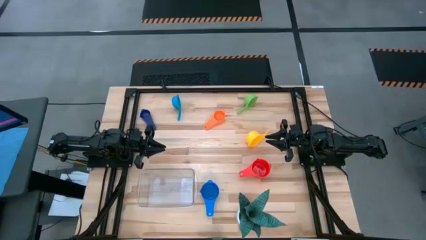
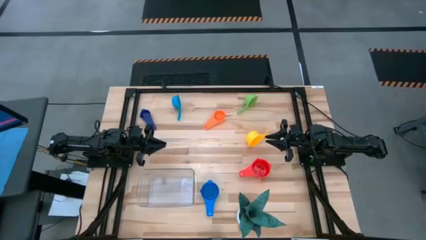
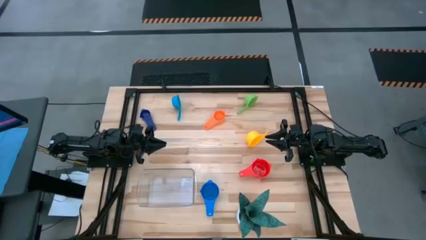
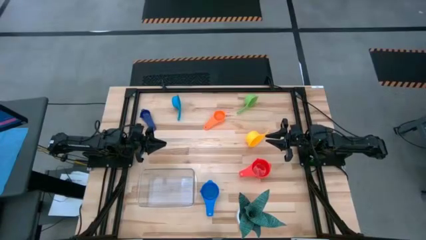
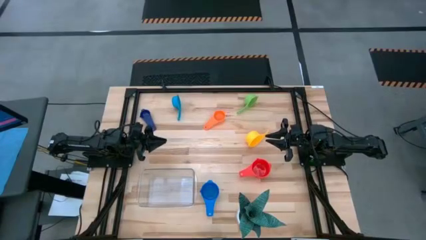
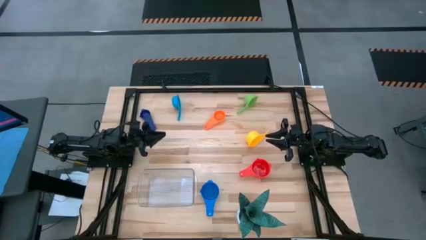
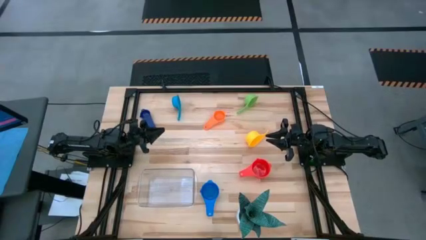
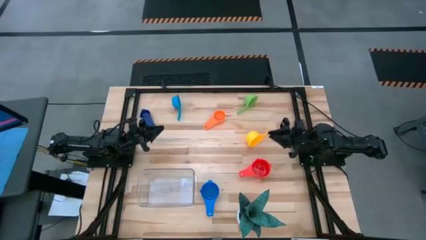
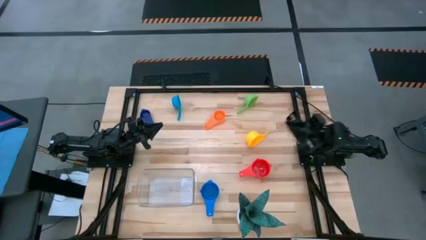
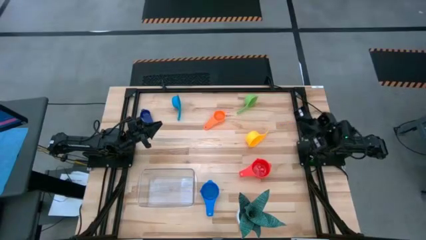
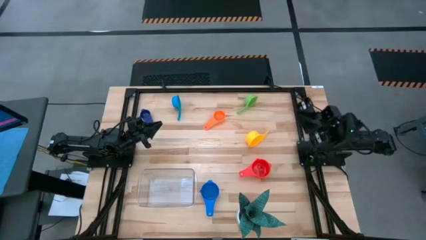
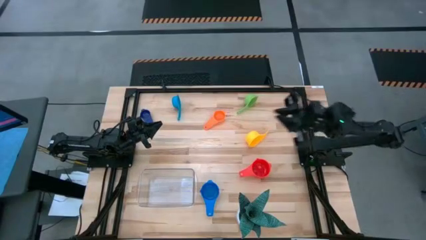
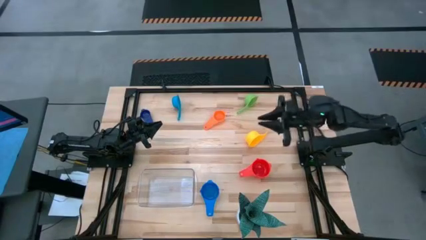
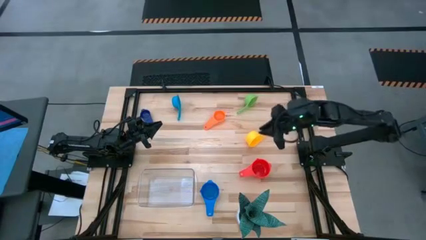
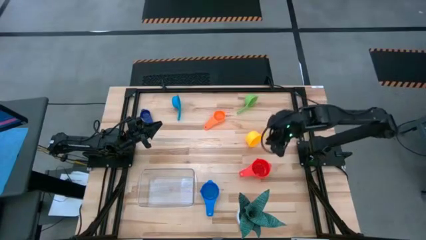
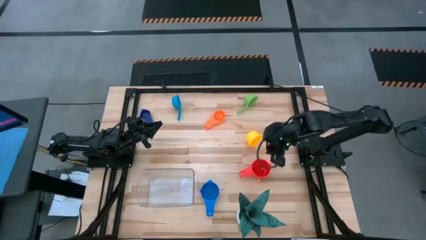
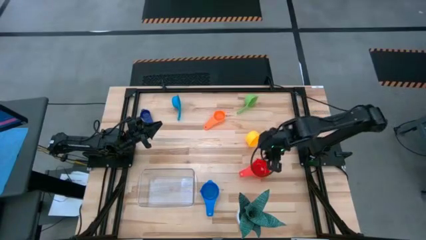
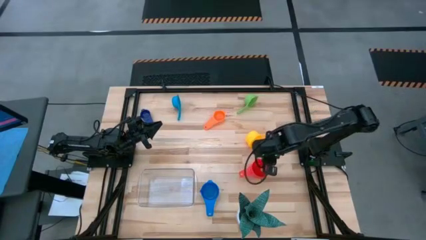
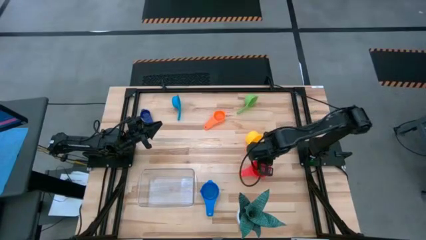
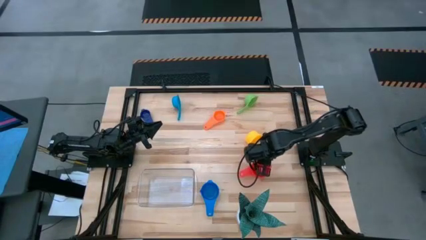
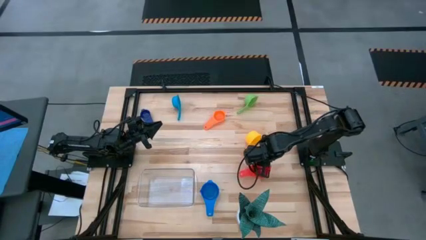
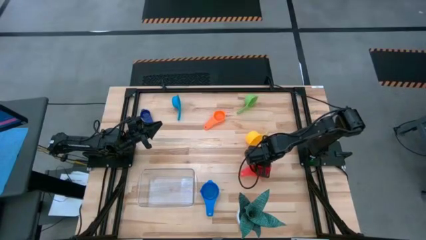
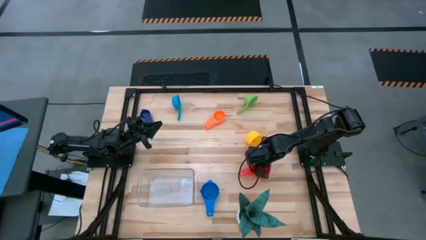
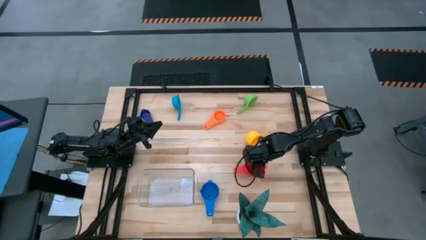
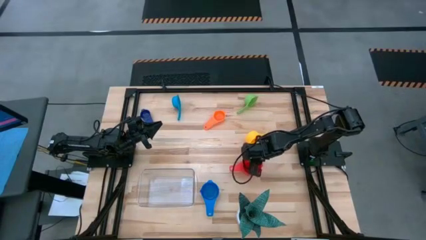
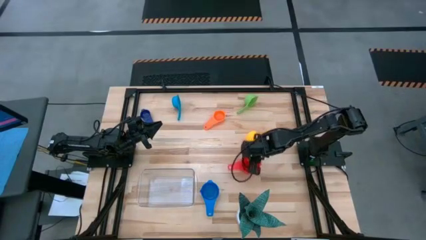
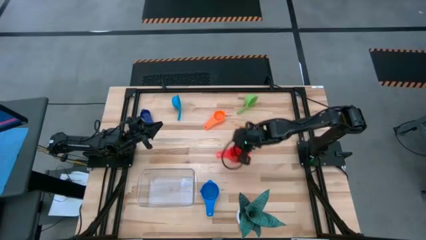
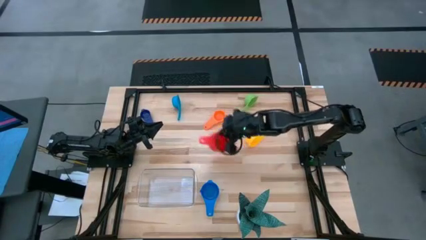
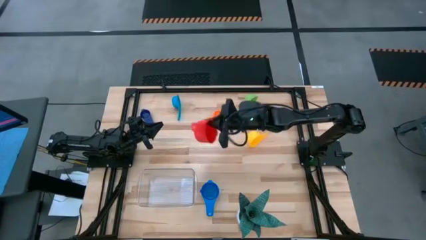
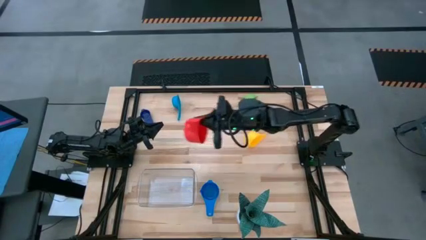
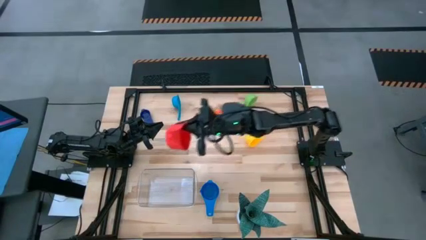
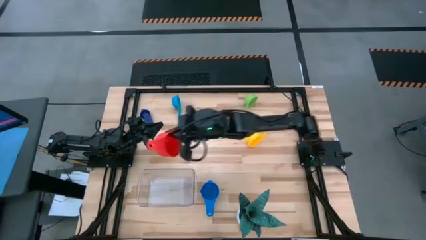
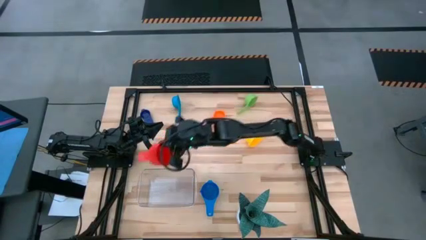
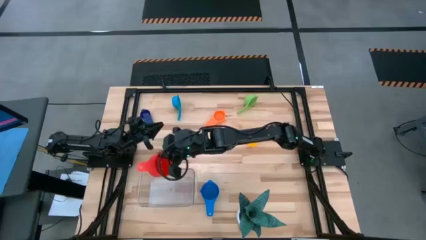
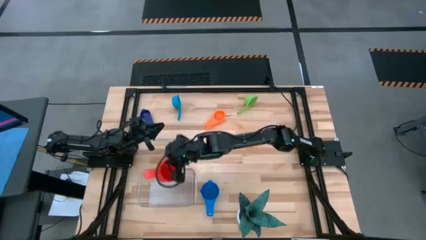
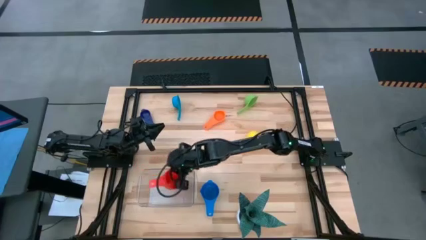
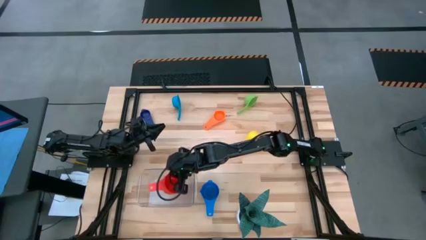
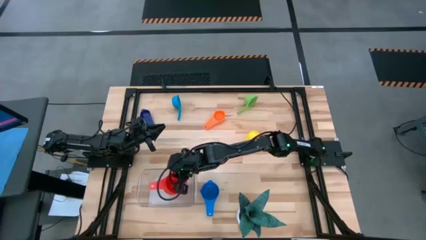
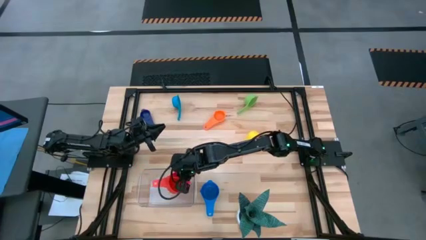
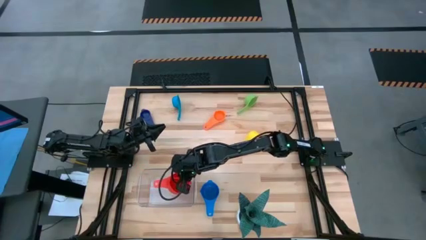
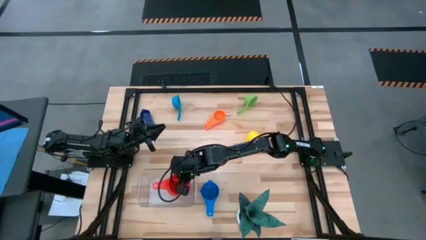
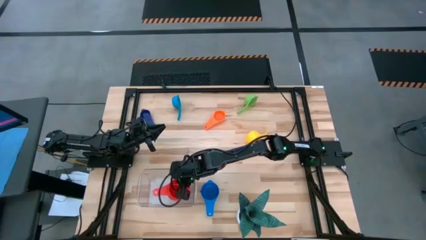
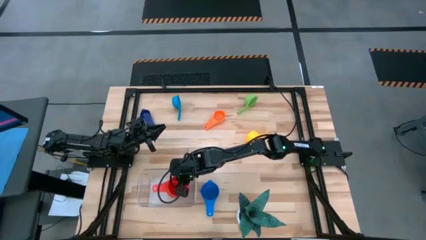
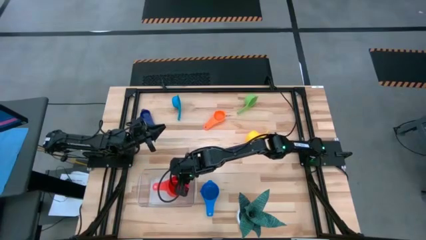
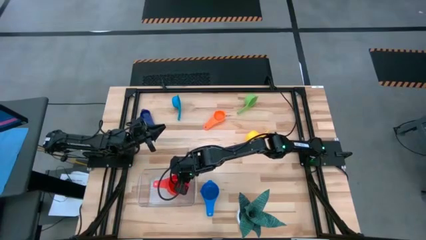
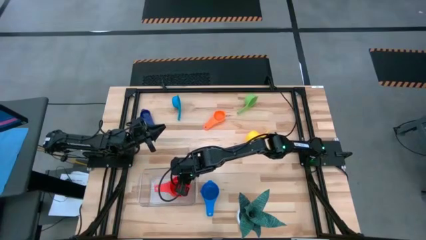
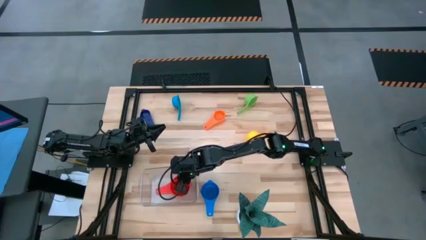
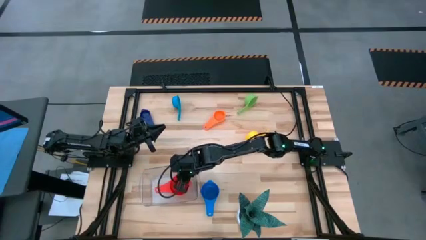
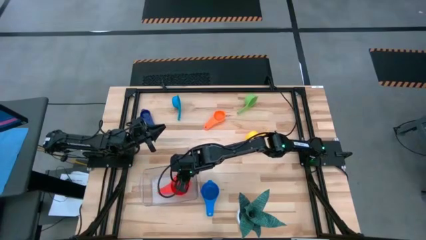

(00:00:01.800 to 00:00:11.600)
Task: Nest measuring cups in basket
Put the red measuring cup into the transparent bin

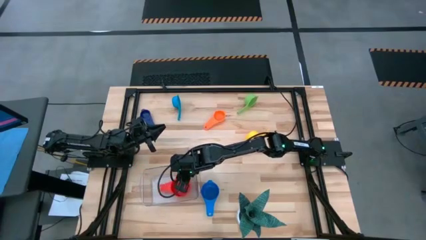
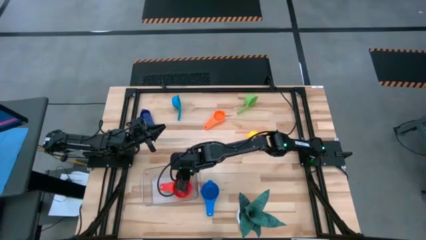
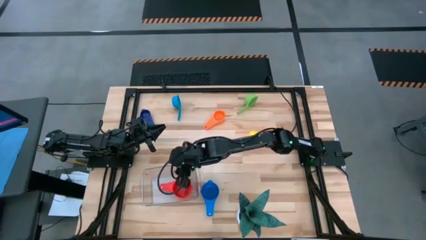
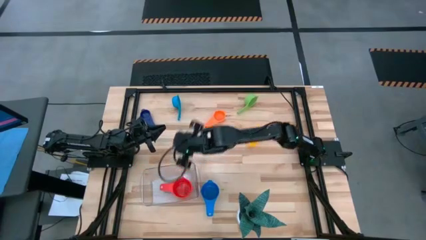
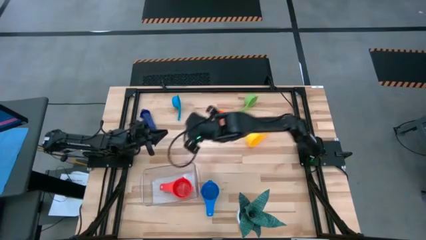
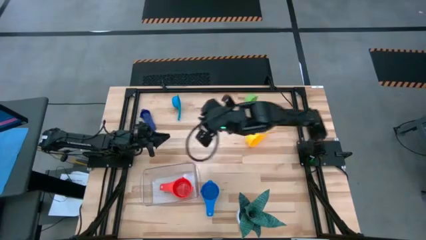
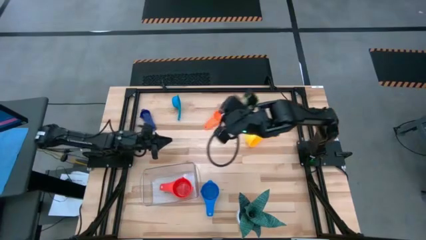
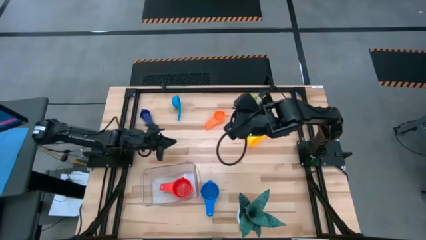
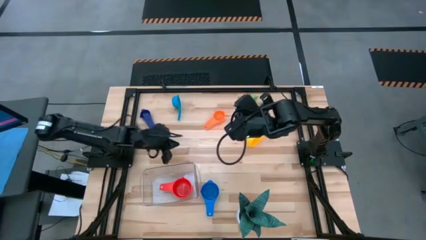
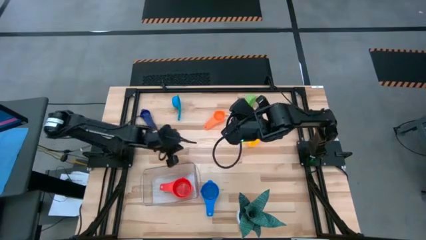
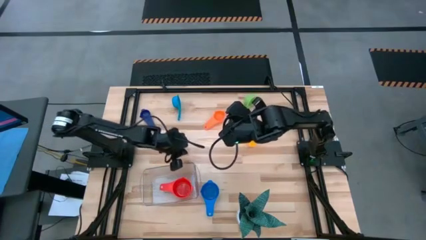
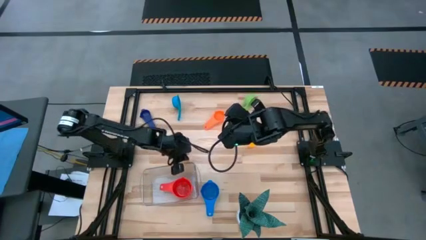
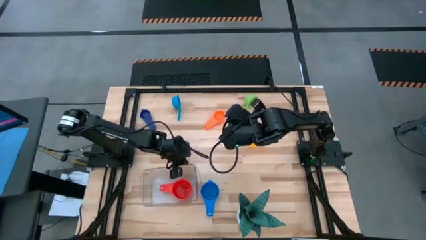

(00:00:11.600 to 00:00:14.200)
Adjust the transparent bin

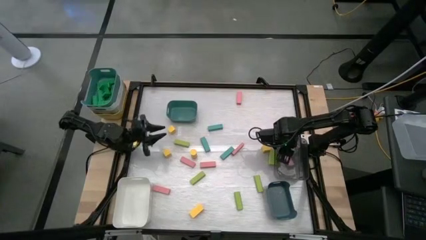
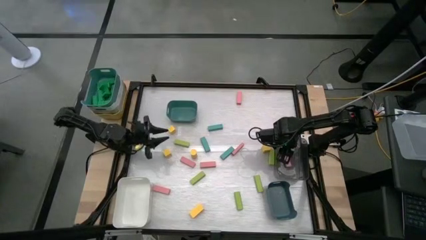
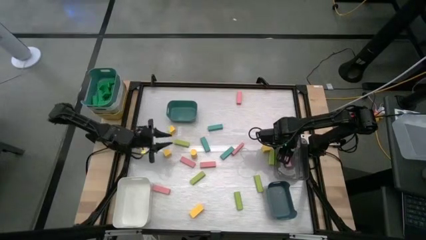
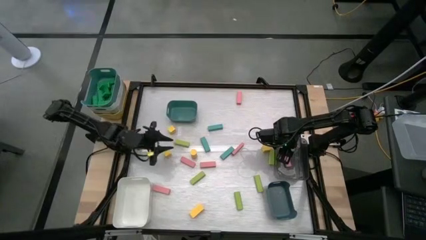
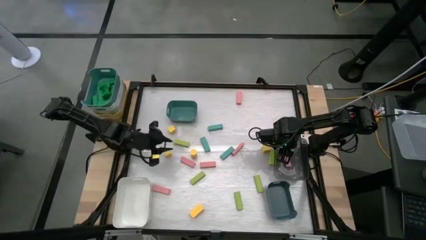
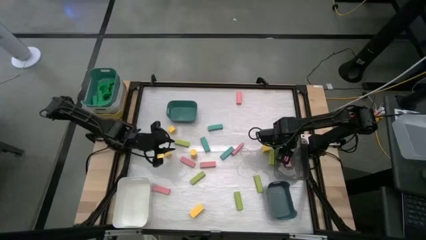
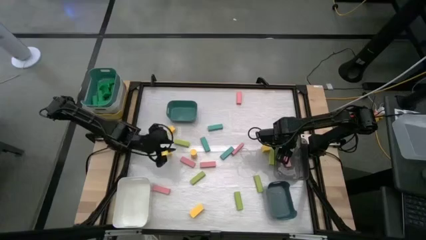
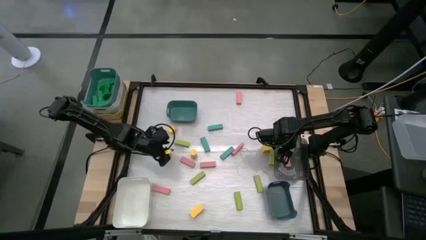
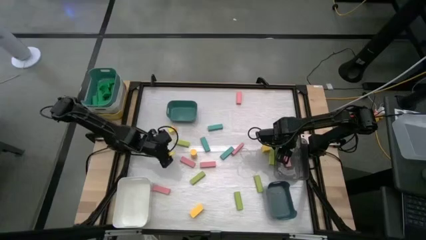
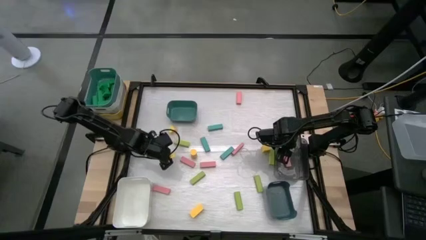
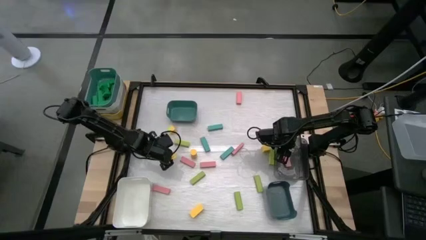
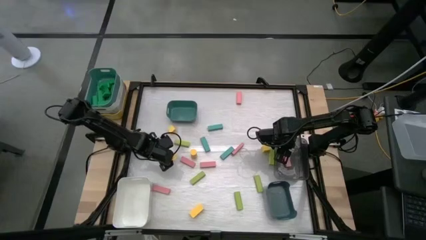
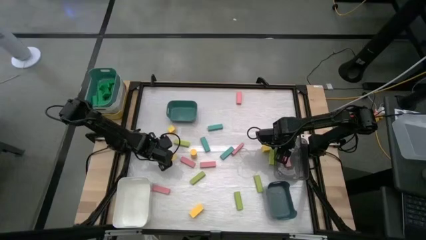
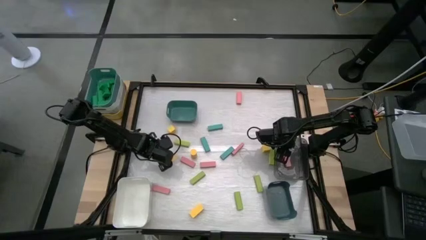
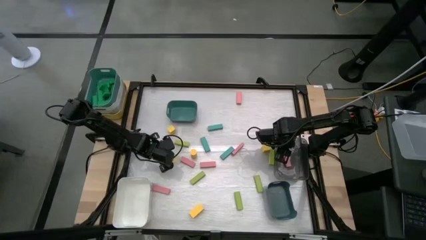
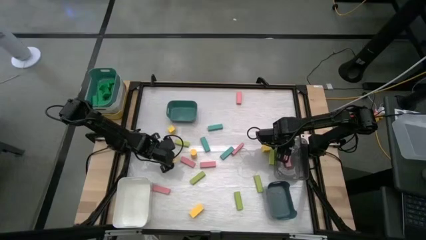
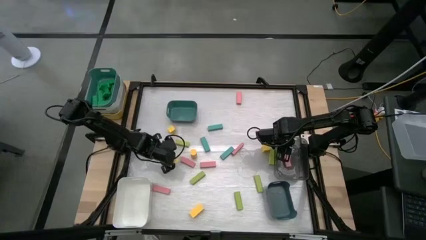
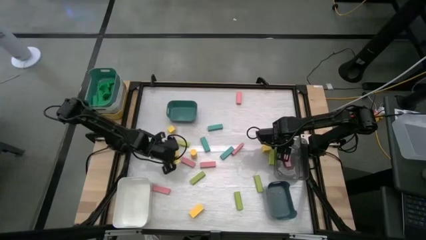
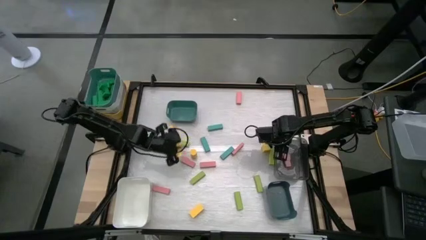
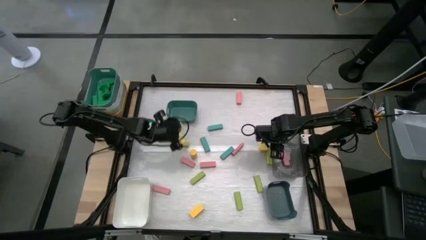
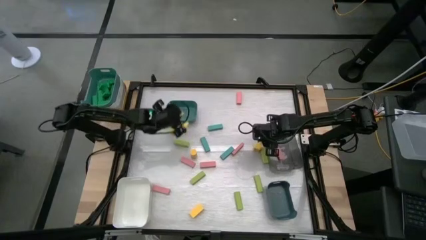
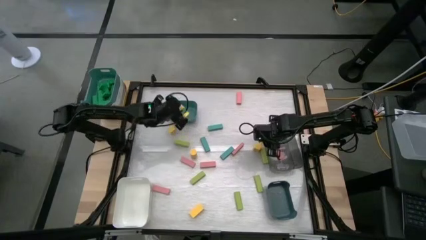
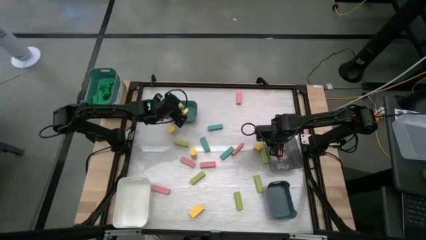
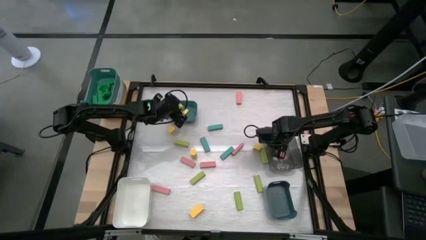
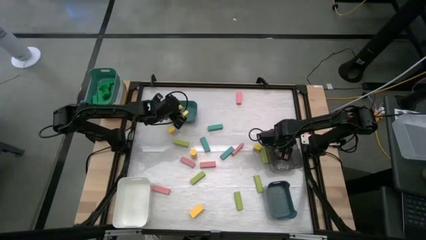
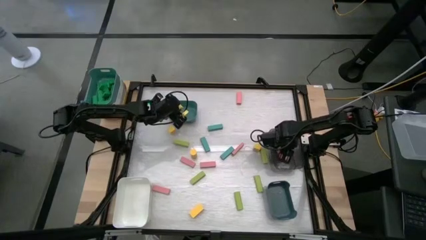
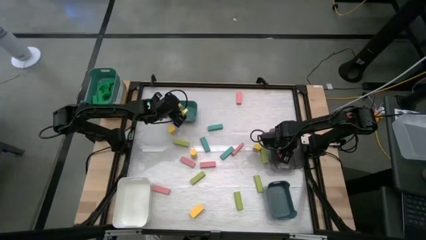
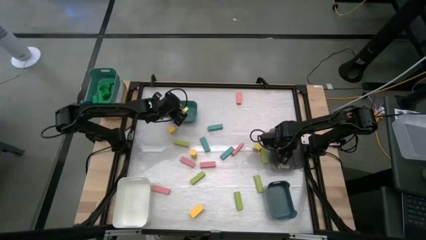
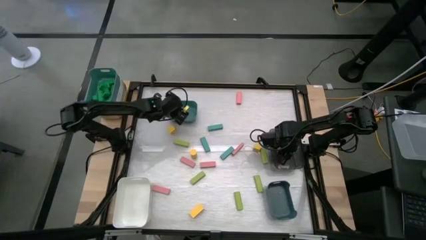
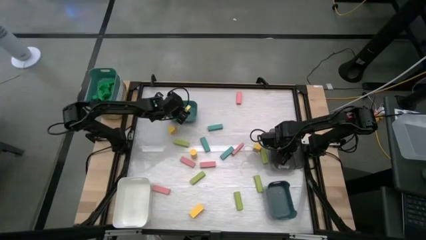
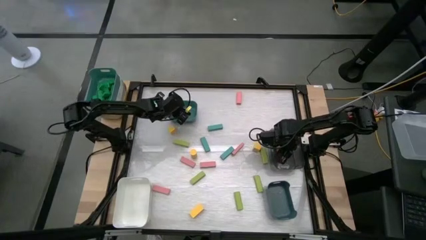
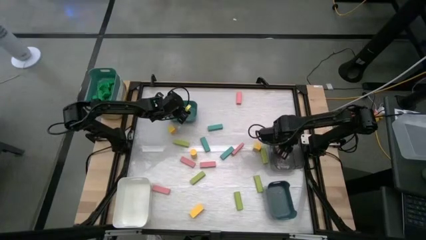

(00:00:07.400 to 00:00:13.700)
Task: Sort blocks
Put the yellow block into the green bin
